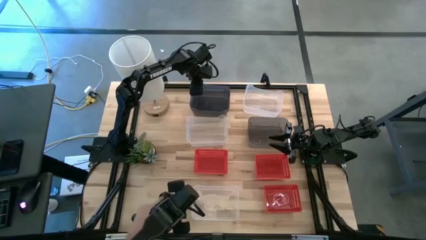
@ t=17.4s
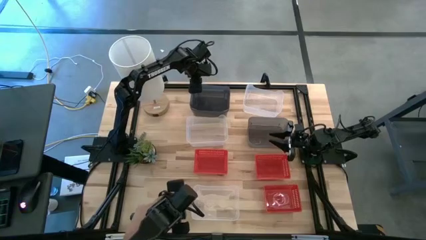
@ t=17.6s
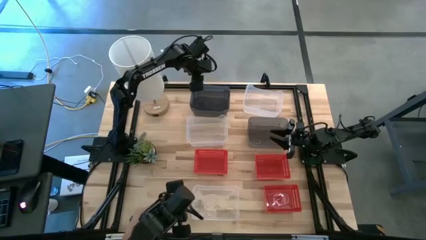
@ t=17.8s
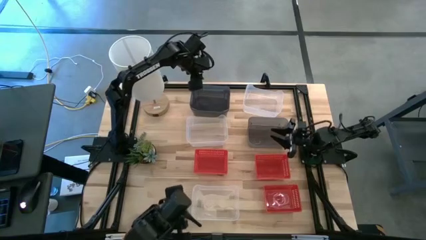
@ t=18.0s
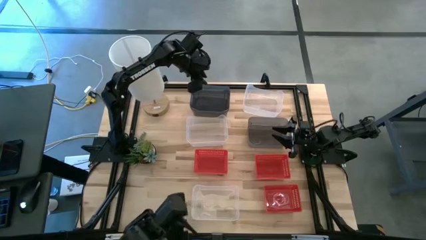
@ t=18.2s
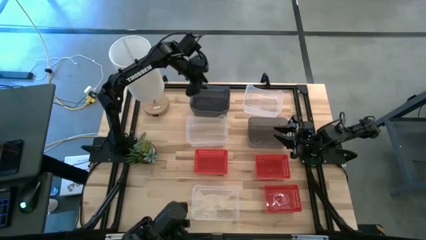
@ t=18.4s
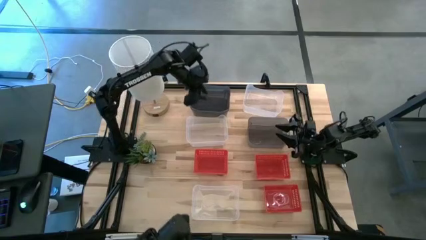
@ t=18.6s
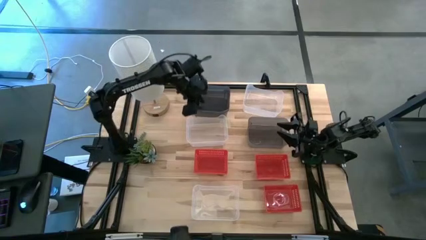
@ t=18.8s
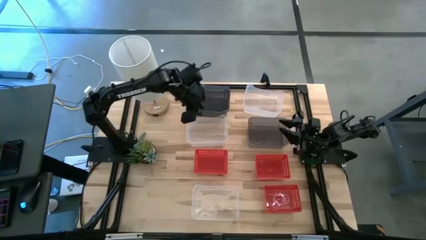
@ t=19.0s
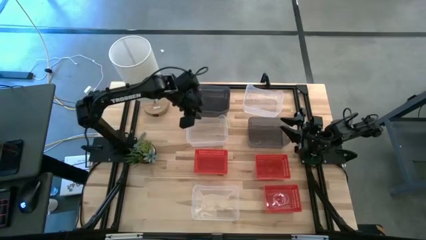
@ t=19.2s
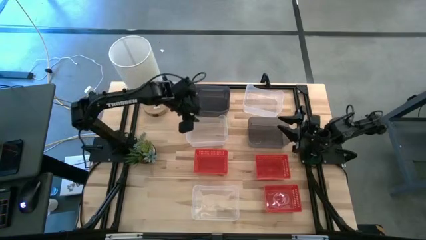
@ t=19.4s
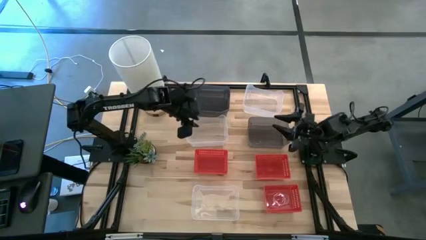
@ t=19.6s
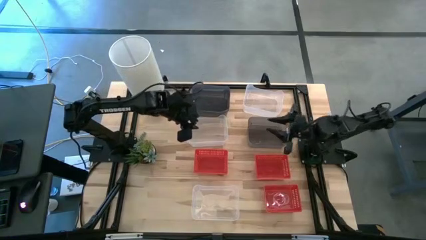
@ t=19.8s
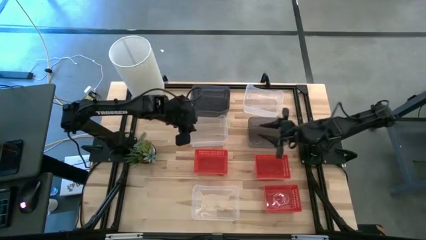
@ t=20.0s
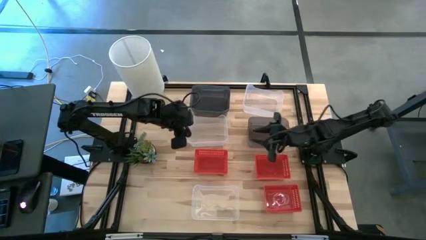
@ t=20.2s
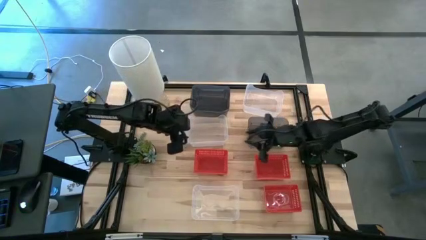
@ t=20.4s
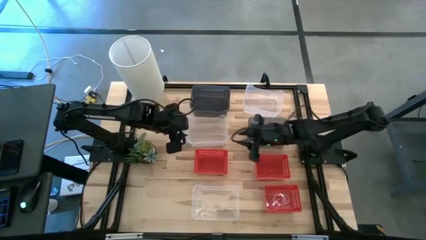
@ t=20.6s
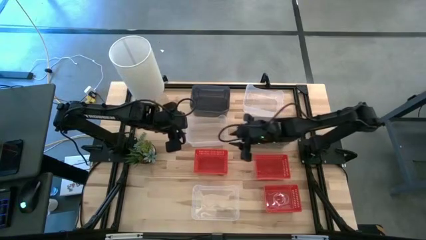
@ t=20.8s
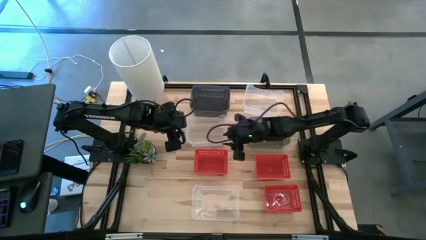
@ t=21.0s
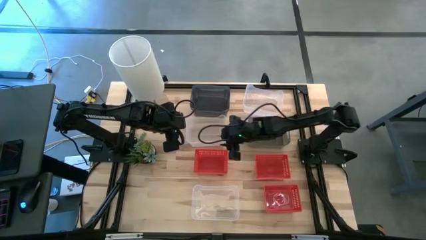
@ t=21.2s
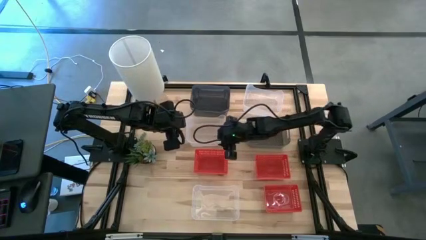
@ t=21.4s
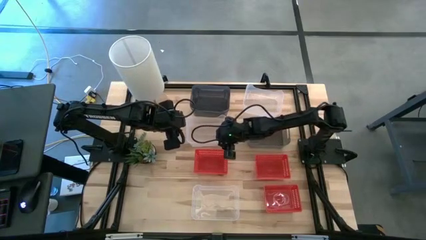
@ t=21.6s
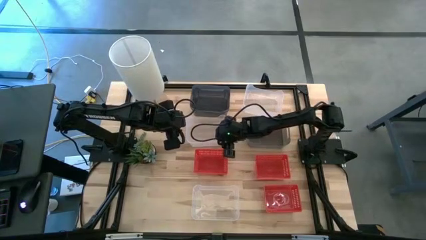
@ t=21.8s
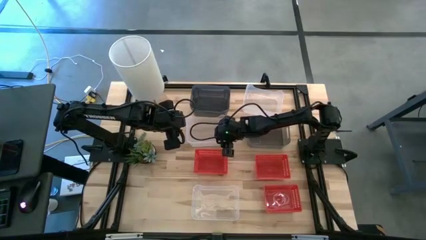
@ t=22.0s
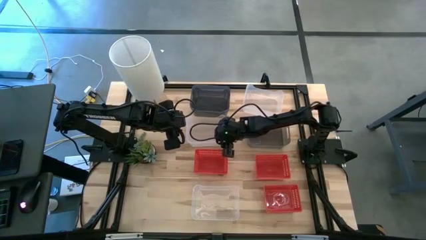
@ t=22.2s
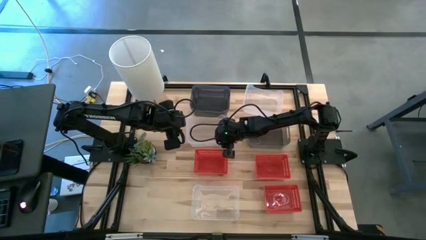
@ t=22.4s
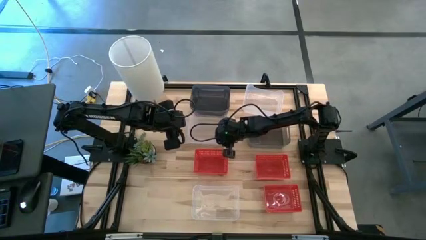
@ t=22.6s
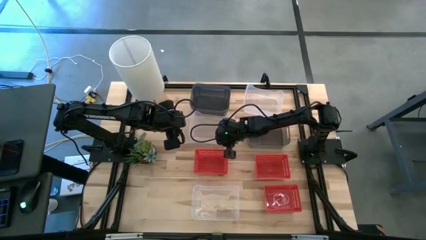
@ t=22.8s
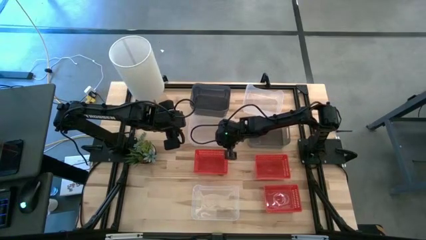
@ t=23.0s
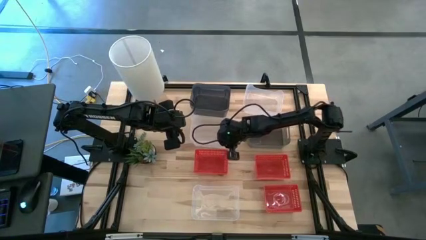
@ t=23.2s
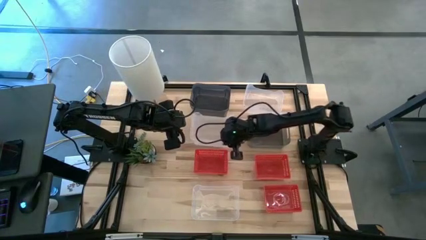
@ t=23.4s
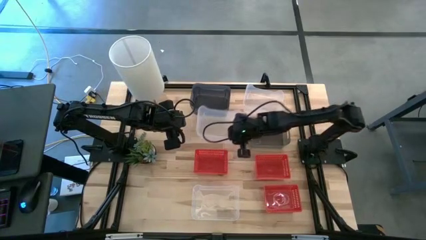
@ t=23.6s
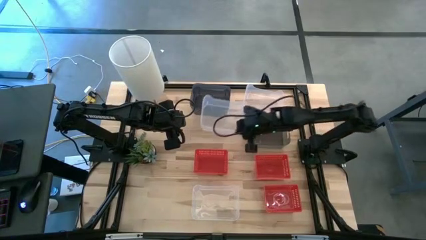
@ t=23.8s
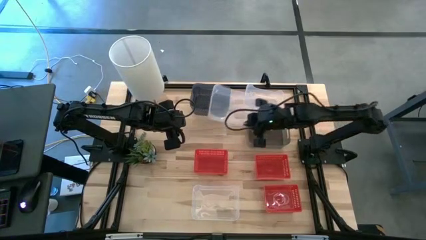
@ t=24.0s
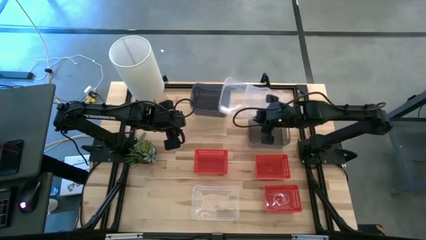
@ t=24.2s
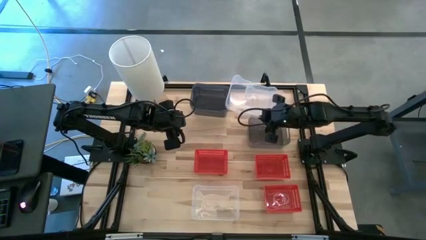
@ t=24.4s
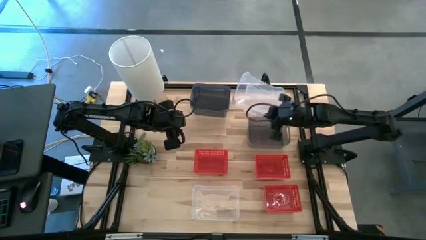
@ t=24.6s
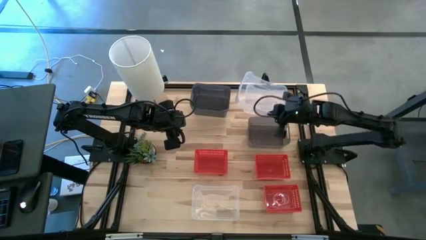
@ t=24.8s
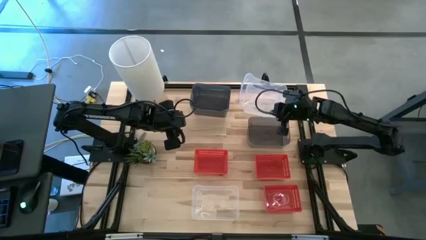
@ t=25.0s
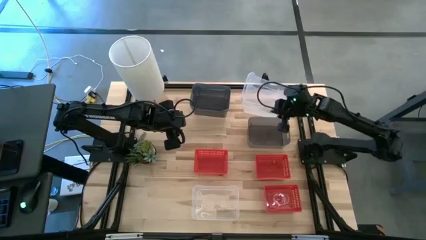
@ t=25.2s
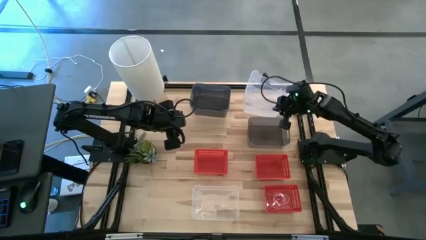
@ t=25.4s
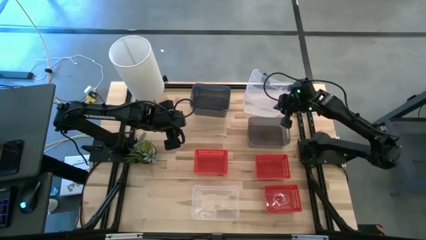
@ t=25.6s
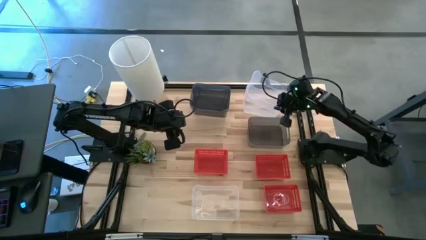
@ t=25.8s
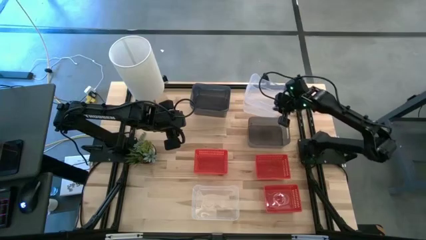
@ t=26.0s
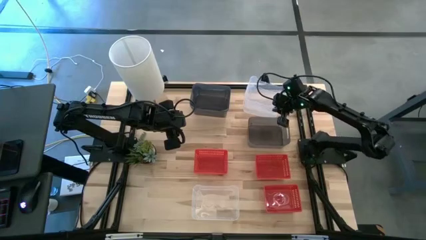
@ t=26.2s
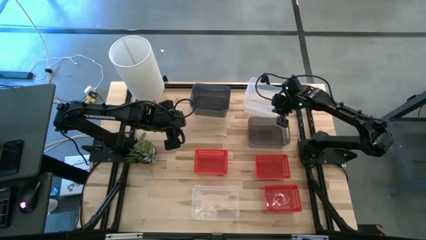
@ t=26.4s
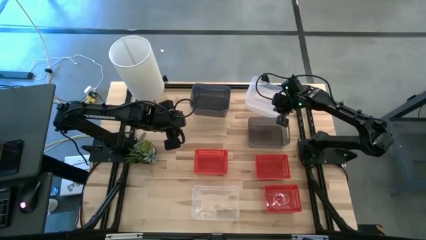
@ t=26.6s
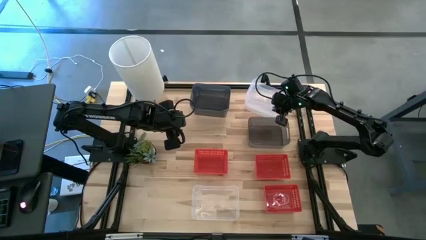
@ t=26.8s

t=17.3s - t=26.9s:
Stack the middle transparent bin on the top transparent bin
